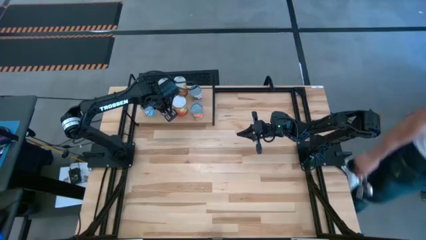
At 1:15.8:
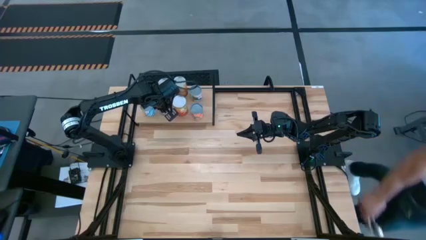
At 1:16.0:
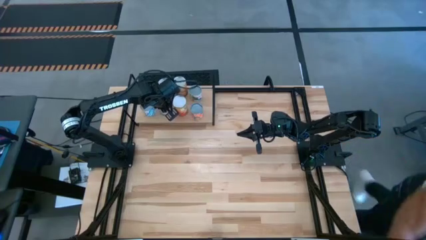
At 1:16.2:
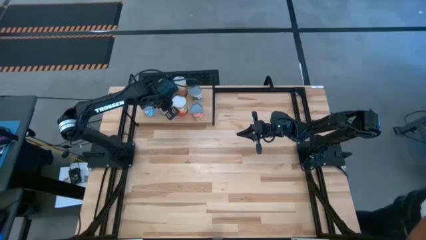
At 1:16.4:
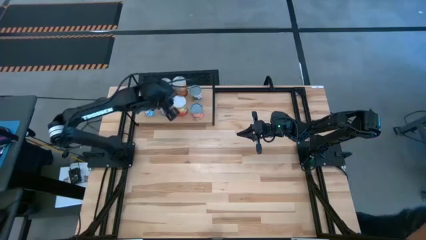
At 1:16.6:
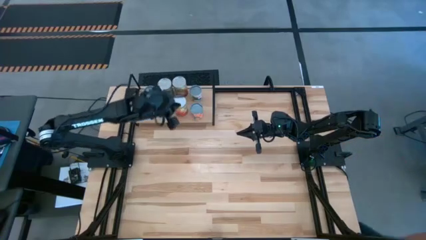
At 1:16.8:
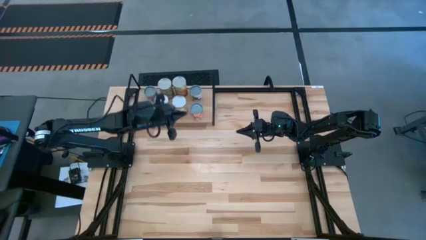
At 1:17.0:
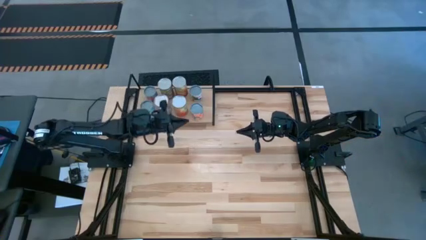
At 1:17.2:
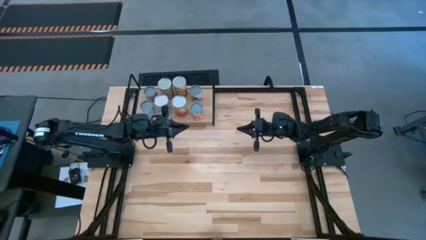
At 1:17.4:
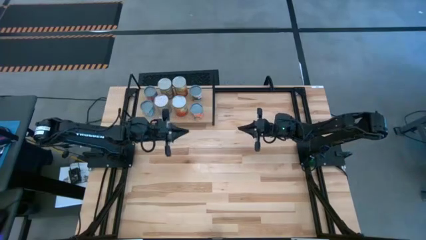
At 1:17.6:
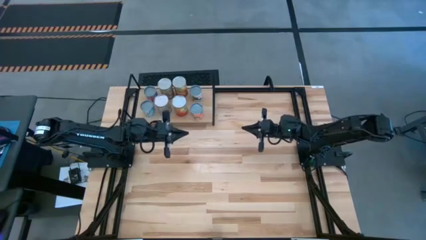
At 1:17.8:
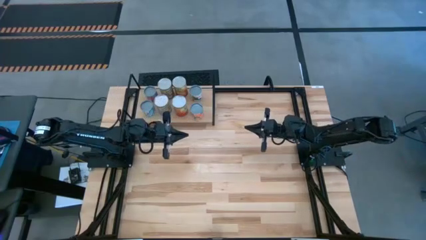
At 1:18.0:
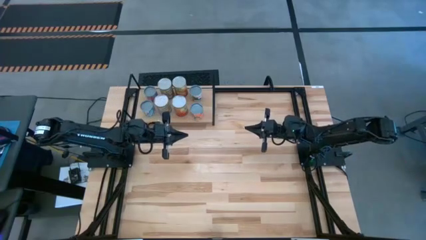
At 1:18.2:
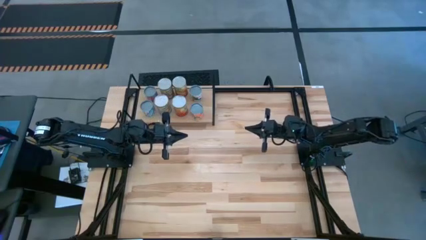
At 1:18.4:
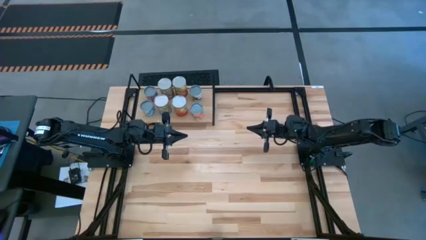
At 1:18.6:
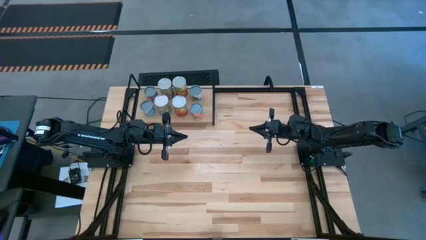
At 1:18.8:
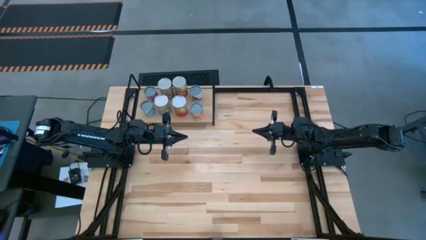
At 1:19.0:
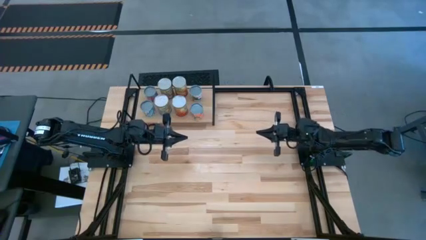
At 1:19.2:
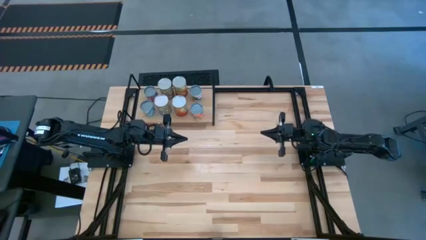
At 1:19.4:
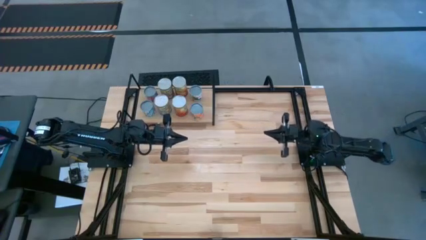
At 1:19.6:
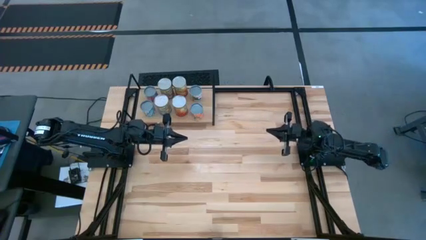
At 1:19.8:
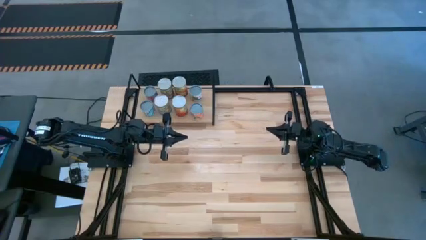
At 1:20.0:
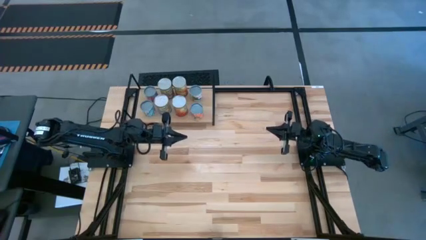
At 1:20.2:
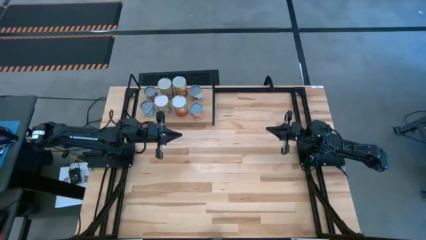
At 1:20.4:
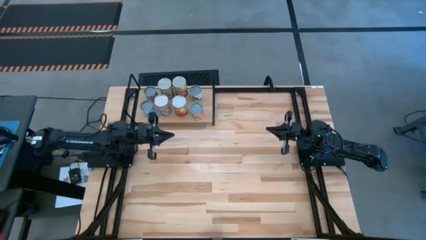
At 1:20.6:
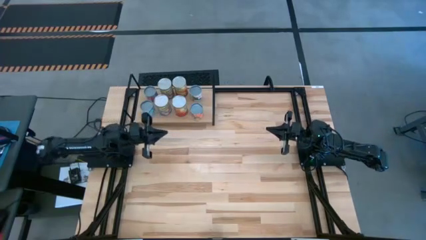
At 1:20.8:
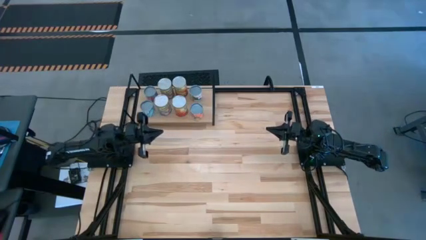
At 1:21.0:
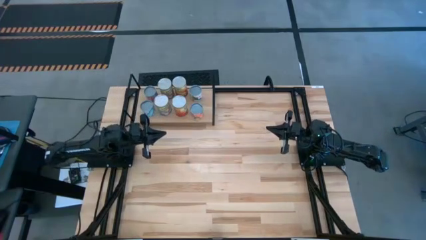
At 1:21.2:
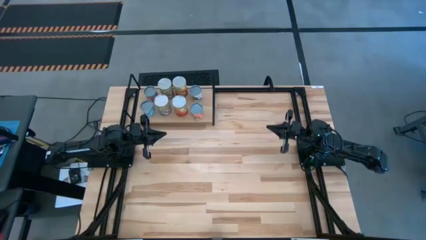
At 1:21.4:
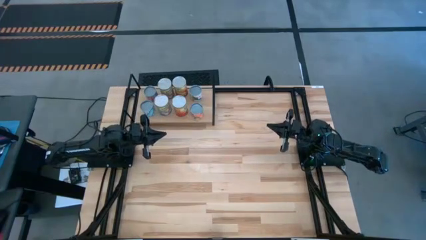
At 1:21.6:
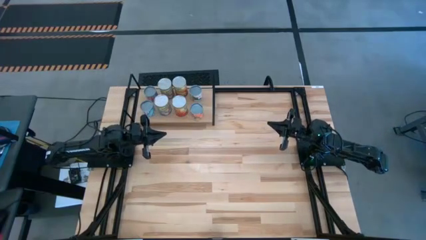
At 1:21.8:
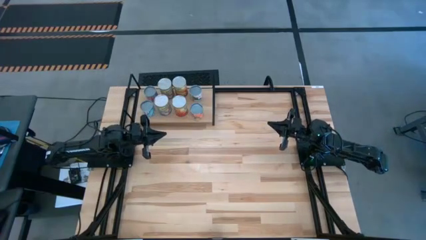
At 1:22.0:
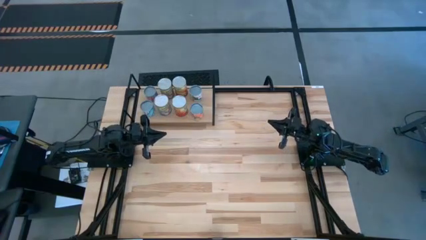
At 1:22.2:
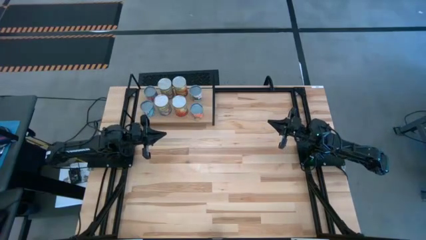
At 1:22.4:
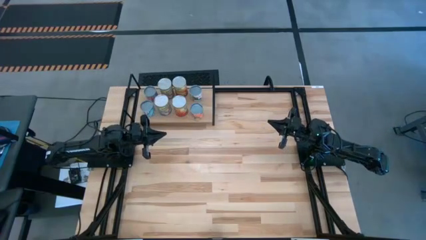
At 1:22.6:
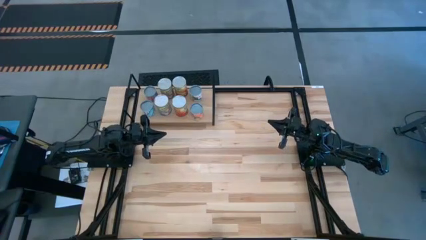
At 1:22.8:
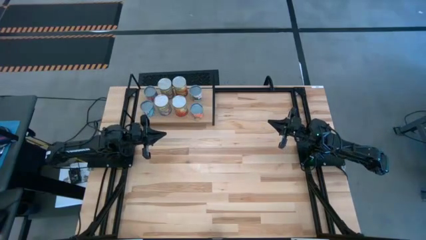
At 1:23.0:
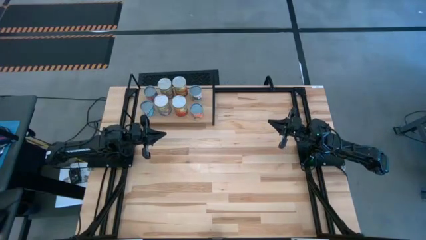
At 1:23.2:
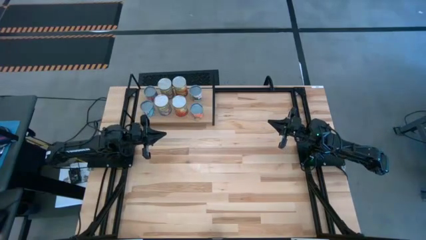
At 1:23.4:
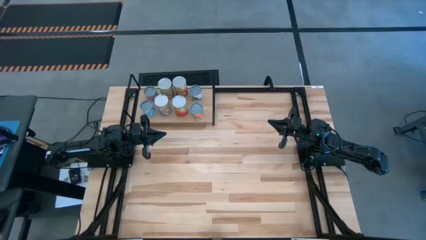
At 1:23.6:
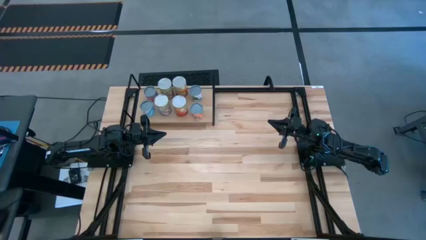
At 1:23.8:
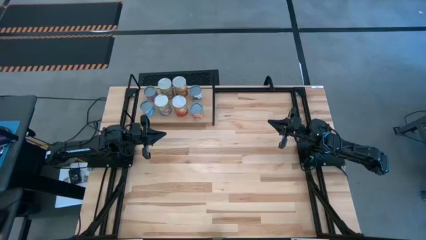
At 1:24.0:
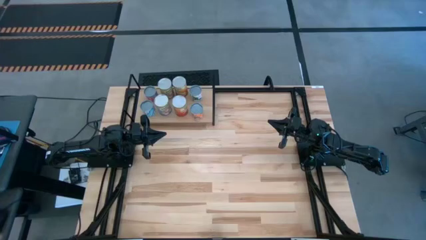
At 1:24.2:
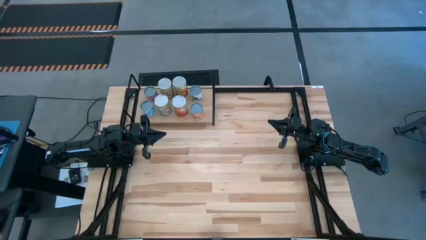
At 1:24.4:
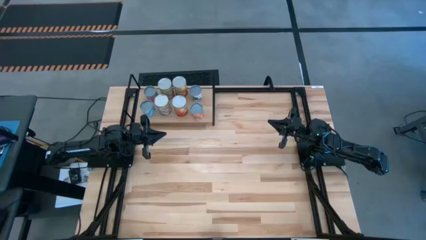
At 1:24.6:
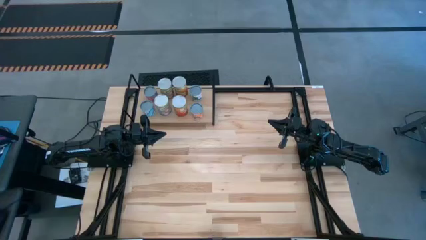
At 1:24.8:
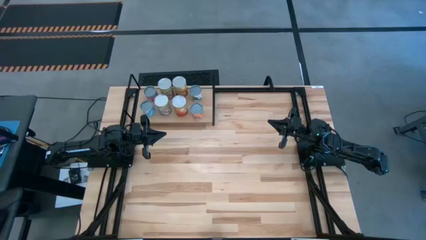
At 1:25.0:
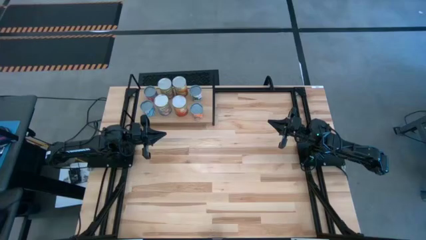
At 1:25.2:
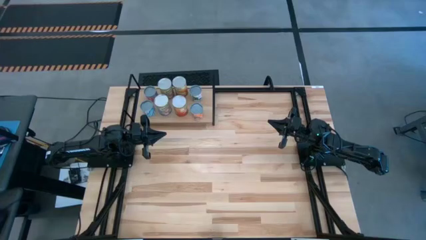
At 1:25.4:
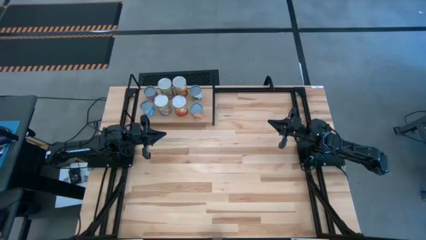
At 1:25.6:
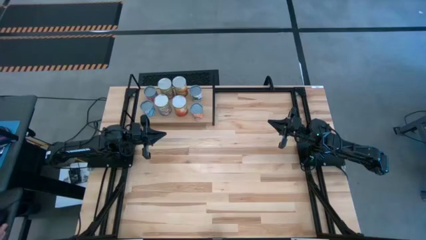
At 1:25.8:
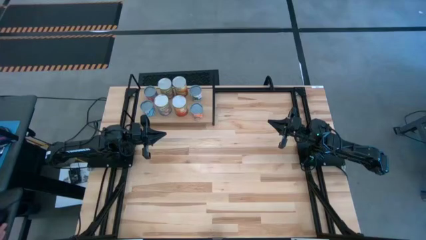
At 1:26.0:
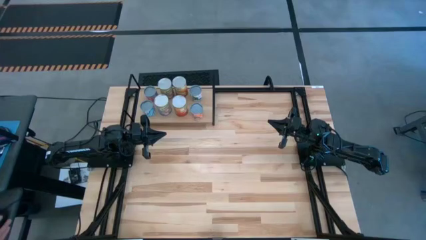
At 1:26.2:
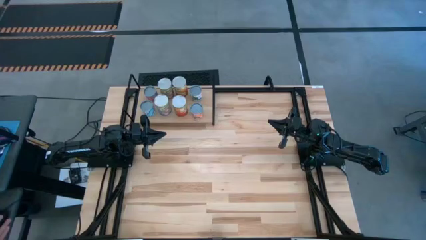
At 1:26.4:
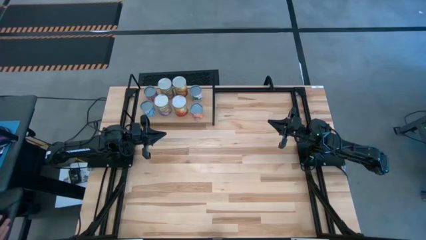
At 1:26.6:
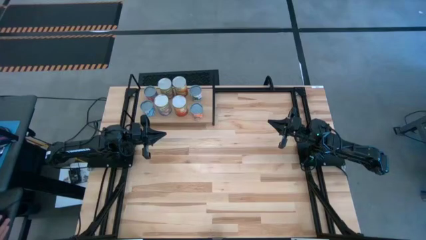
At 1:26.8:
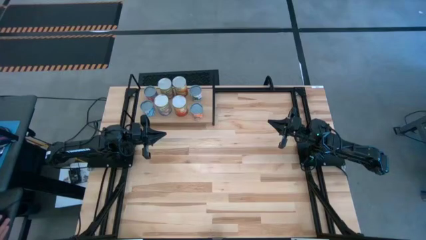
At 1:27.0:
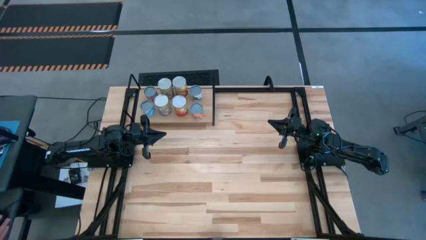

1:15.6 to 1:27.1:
Task: Pick and place cans onto a shelf
Return to Home Position
